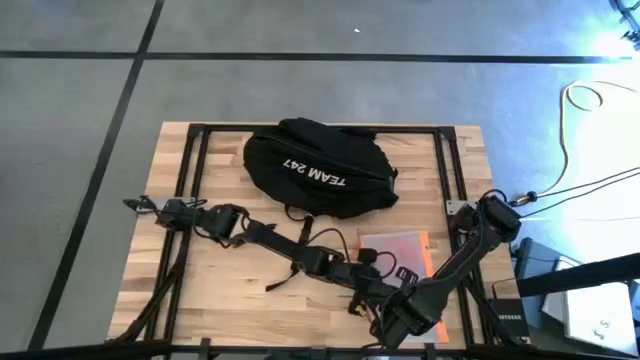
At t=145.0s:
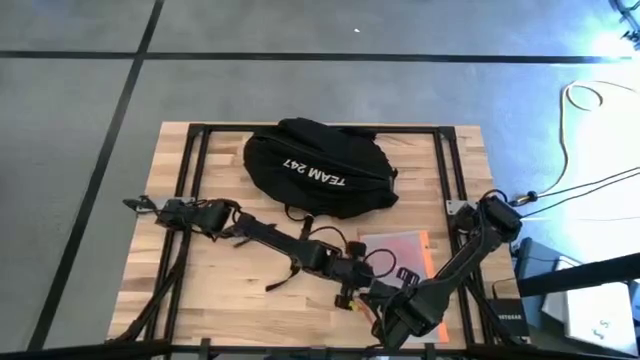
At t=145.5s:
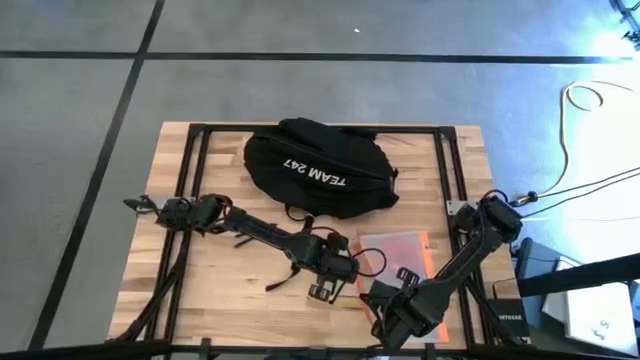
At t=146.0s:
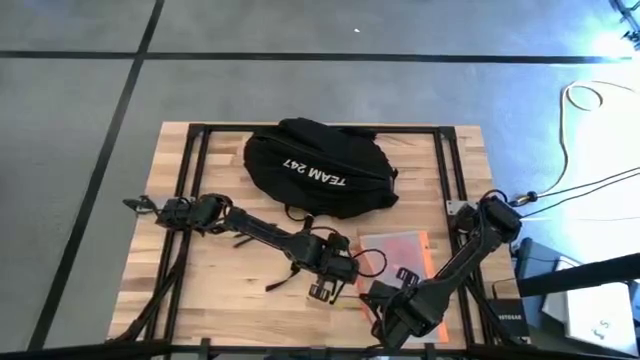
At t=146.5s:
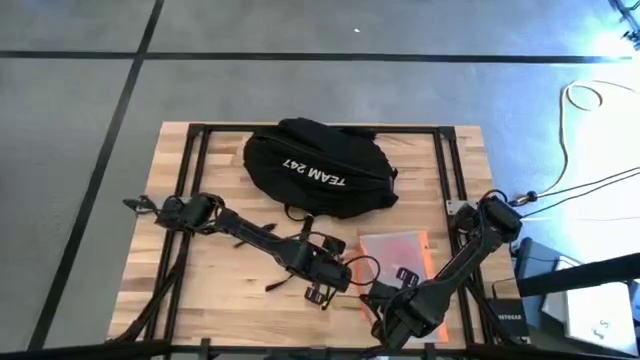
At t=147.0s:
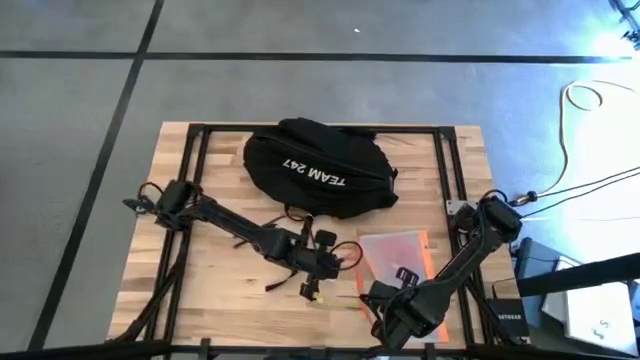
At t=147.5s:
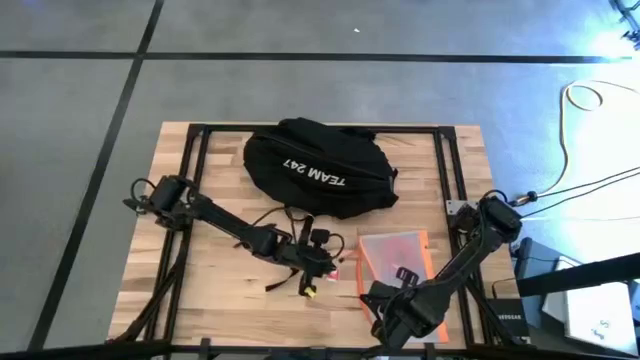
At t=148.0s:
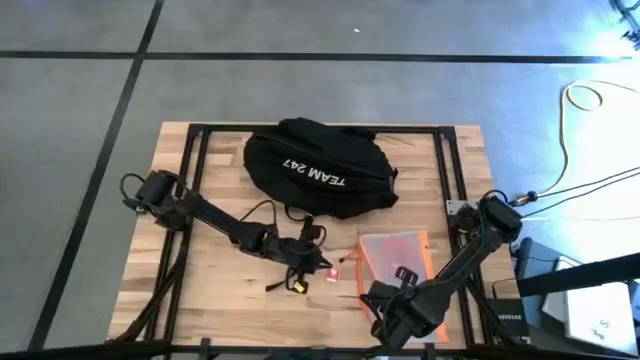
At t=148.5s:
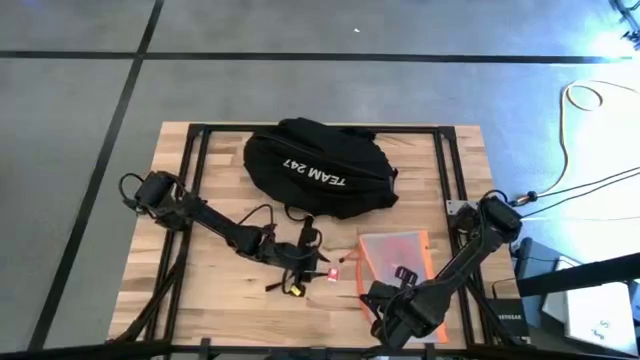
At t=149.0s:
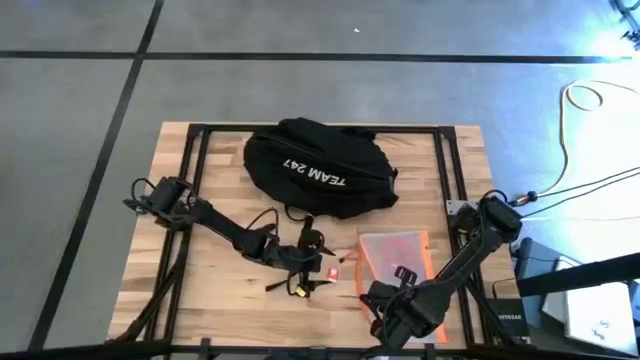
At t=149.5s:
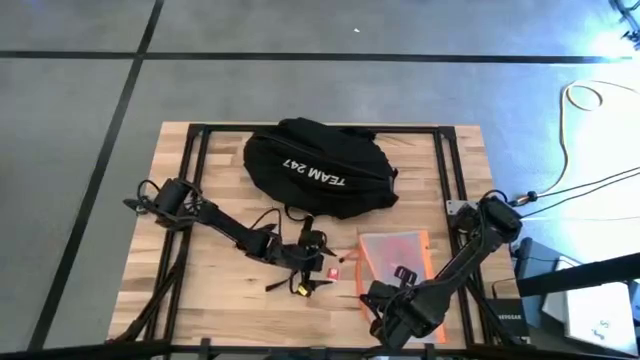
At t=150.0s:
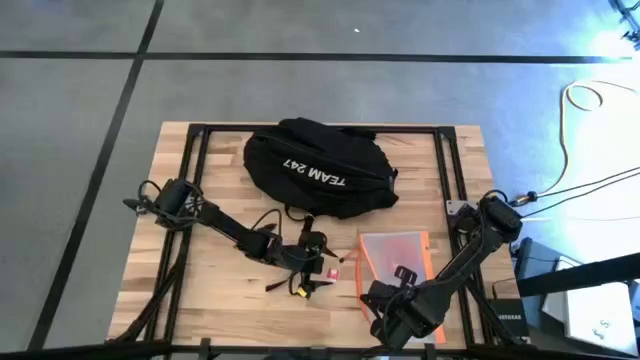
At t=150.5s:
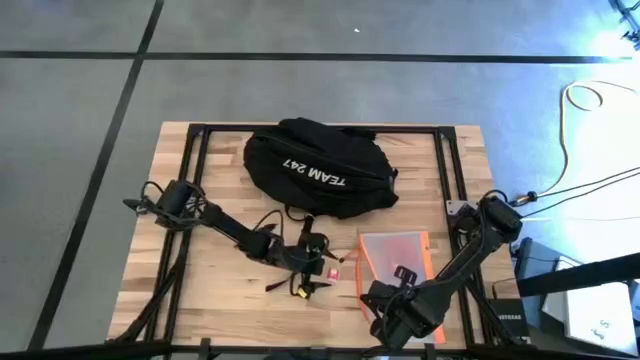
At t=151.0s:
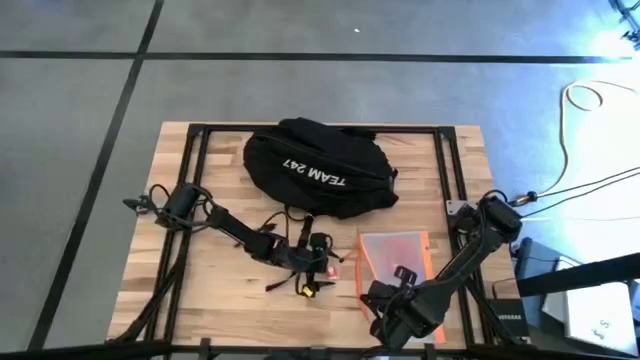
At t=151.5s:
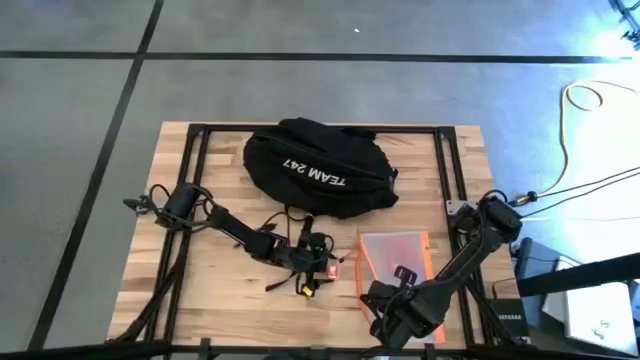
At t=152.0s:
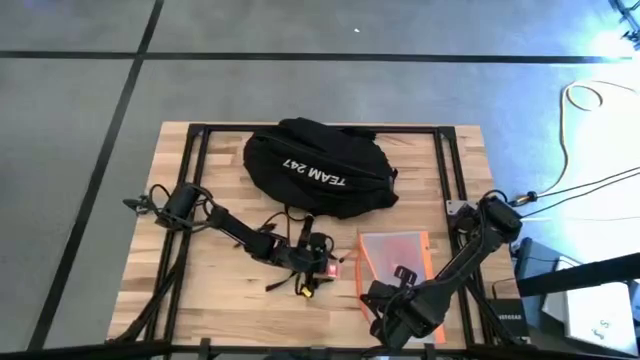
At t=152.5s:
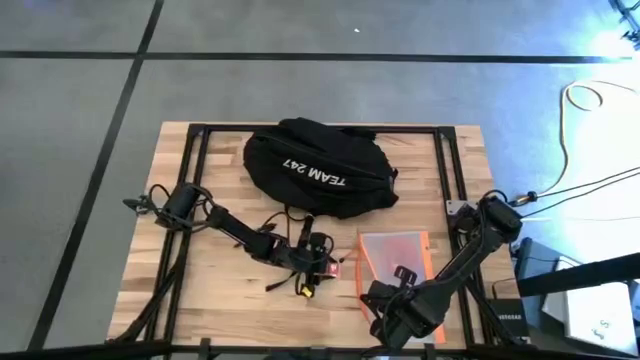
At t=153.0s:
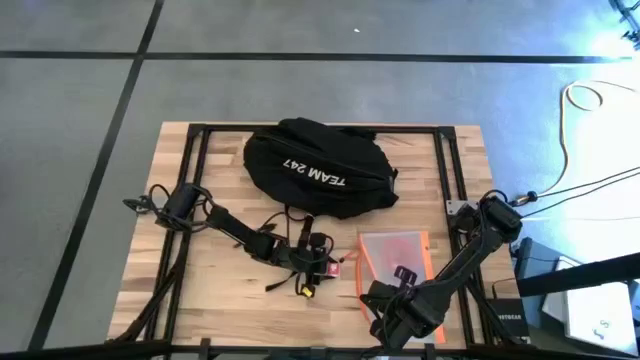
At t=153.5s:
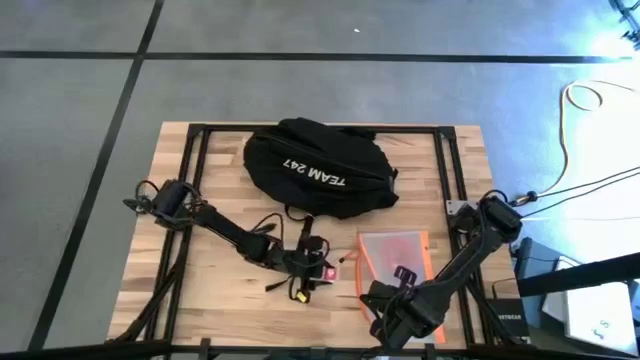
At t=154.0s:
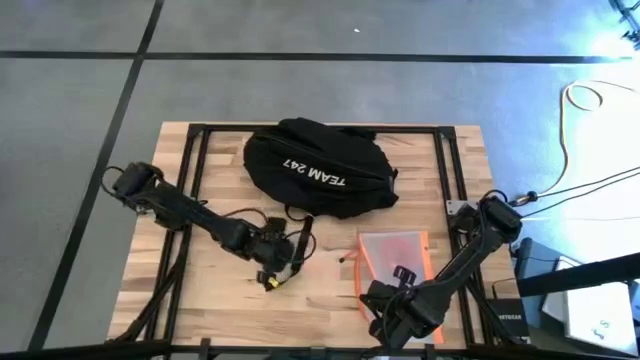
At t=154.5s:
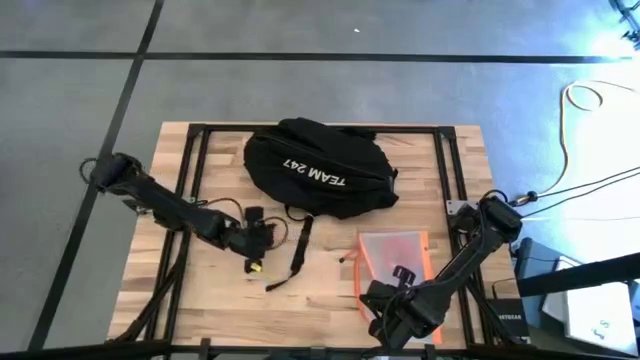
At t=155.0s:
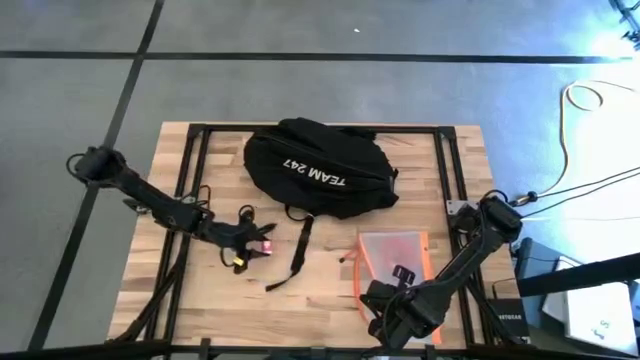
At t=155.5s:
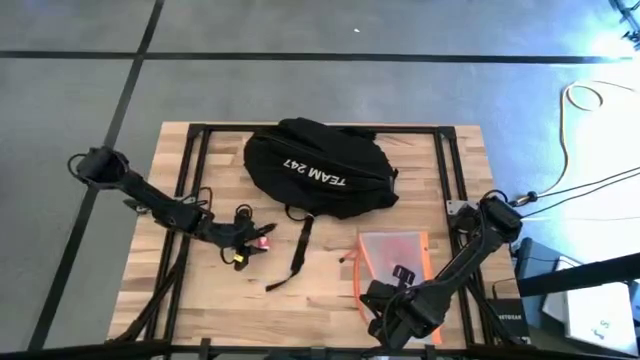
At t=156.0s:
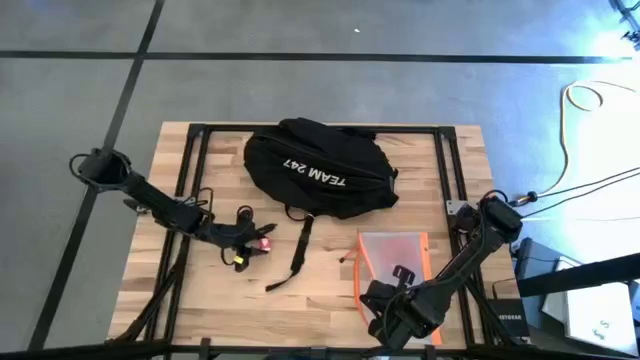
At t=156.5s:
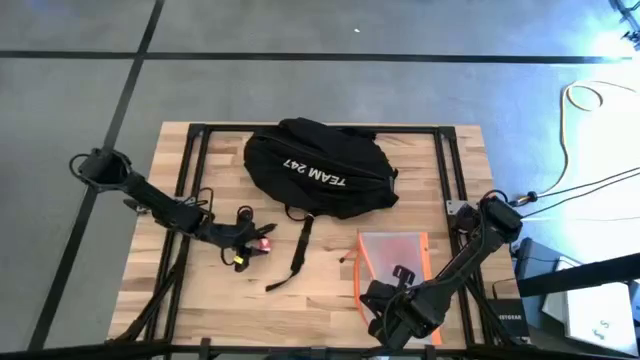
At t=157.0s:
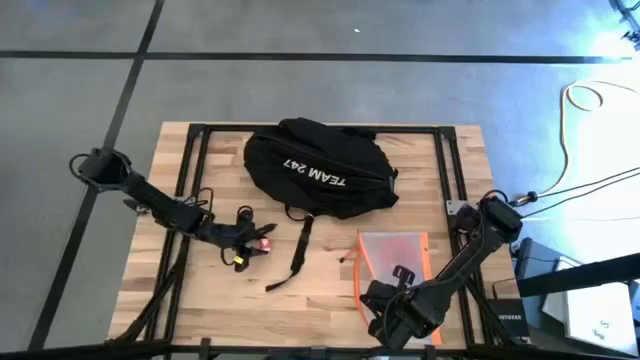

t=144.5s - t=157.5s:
Task: Unpack backpack
Remove the red charger adapter from the transparent white zip bag

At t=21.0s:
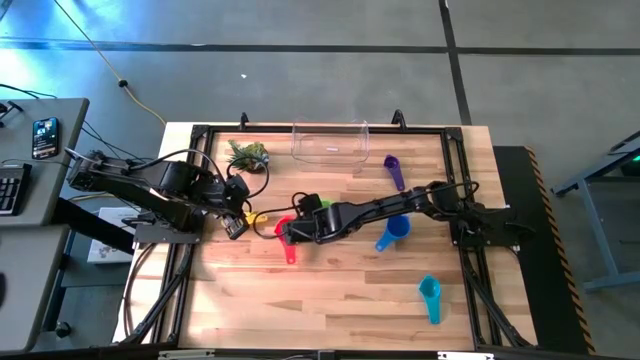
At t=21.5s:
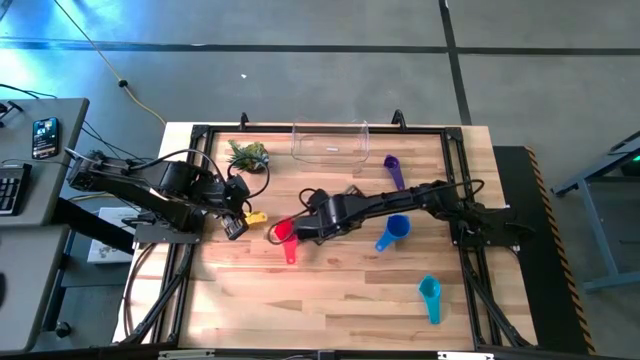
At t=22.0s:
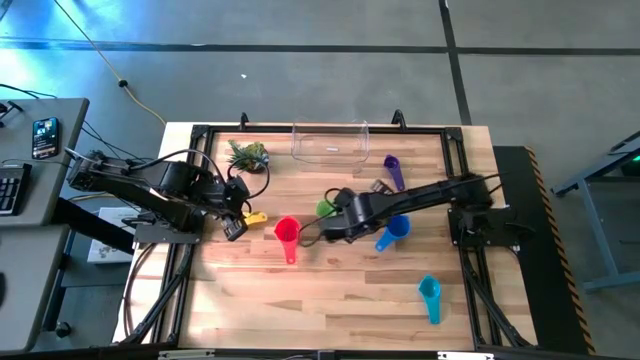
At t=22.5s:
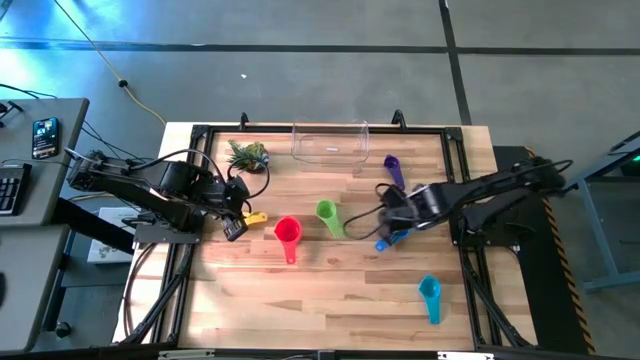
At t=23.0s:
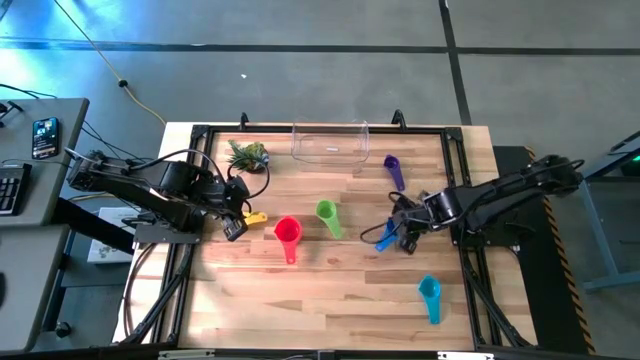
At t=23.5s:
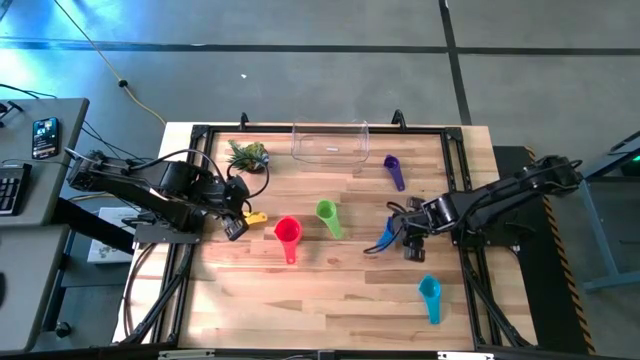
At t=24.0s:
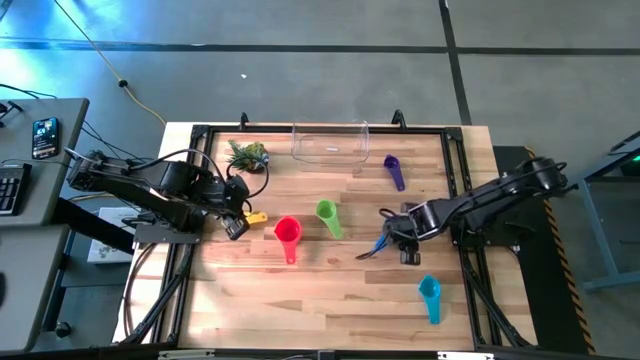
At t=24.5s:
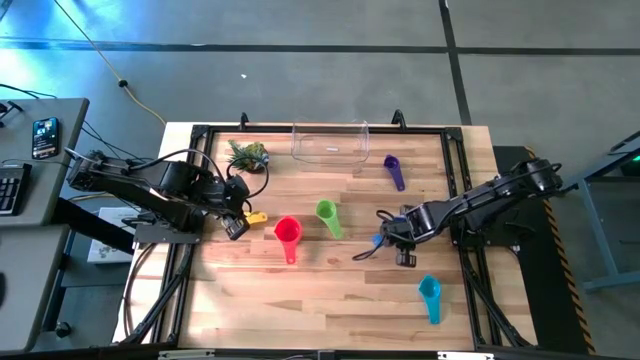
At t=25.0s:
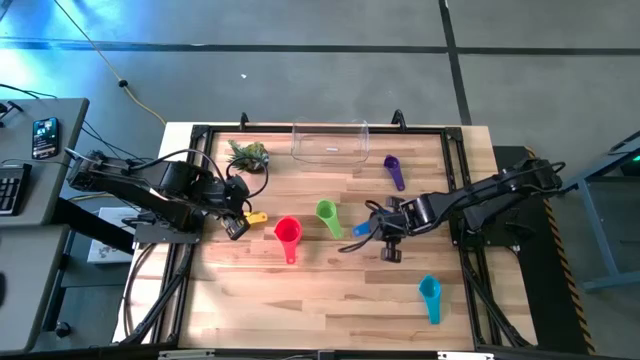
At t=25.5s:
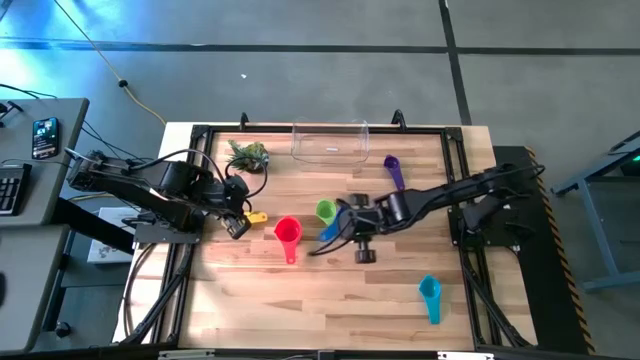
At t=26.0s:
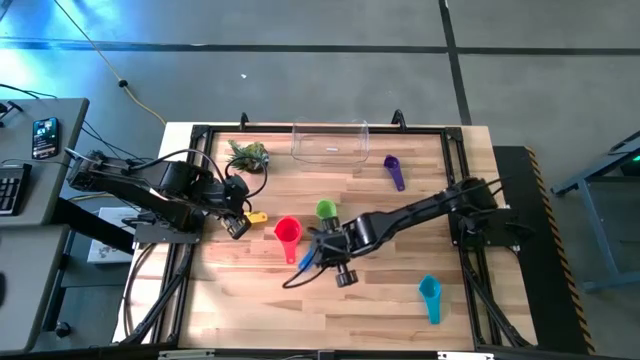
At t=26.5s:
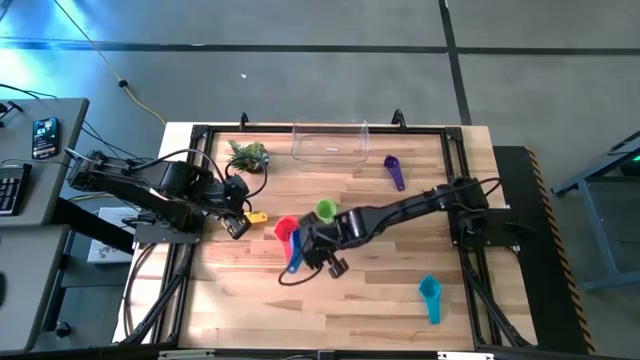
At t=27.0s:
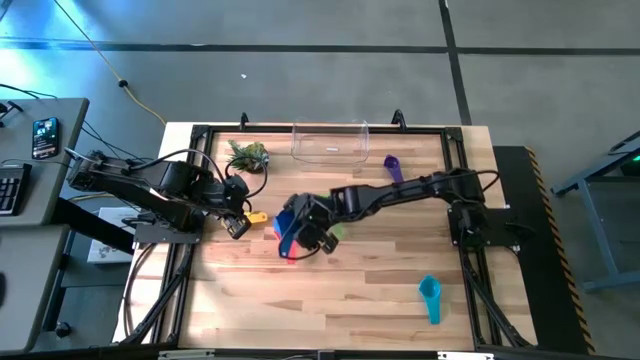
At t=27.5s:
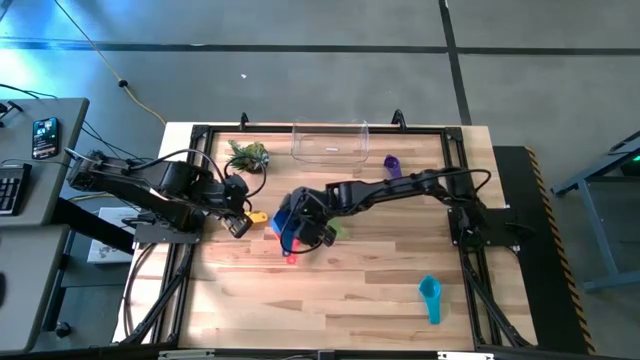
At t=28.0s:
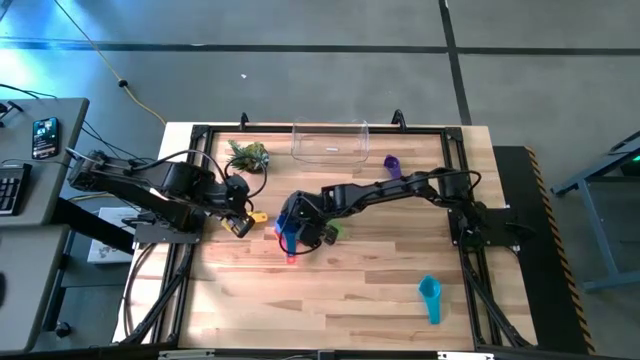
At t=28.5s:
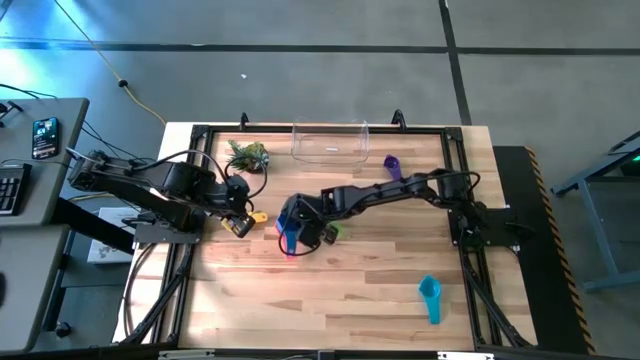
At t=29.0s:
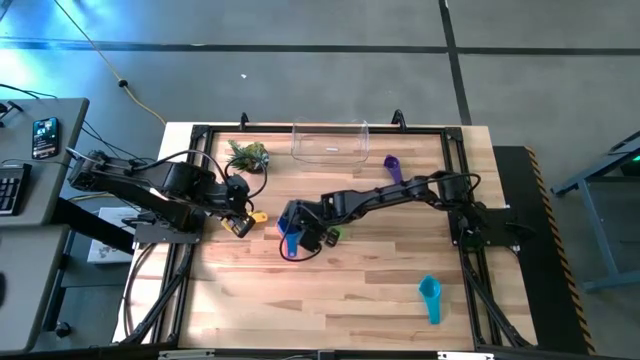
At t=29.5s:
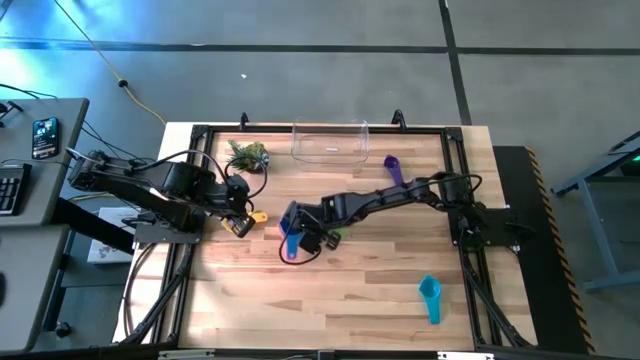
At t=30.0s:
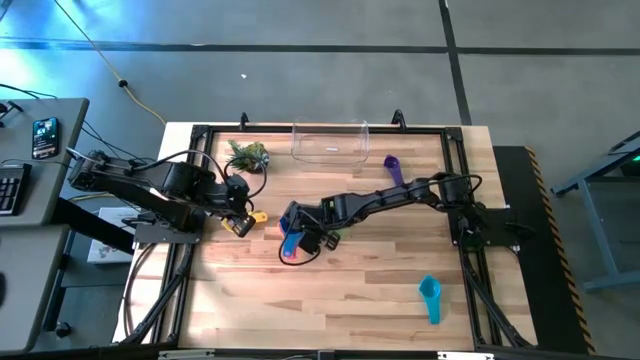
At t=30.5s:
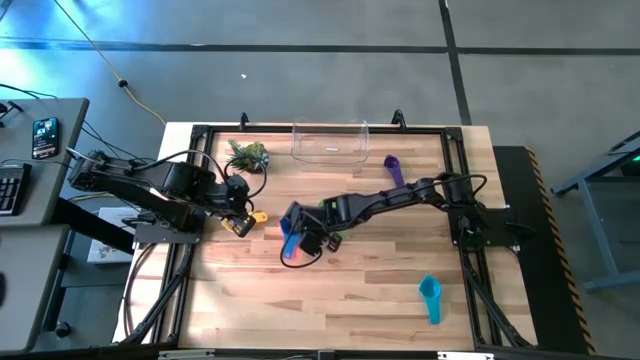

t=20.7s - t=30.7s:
Task: Nest measuring cups in basket
Stack the blue measuring cup on top of the red measuring cup
